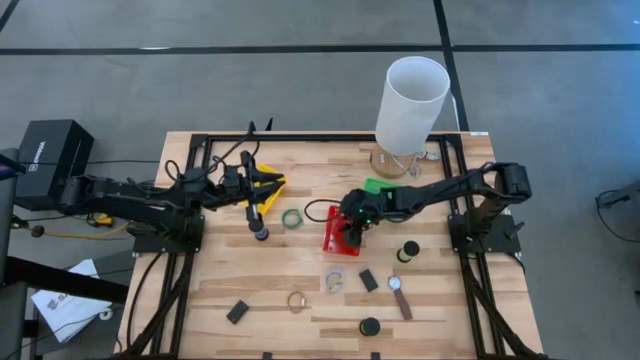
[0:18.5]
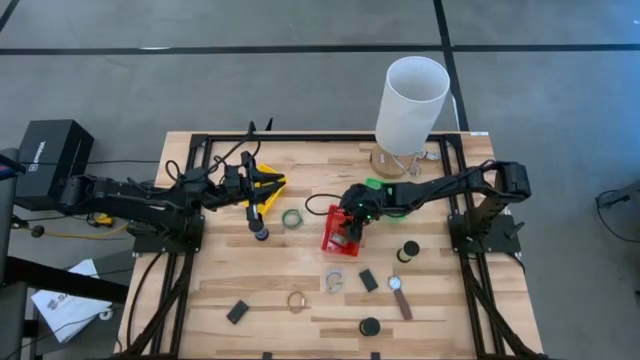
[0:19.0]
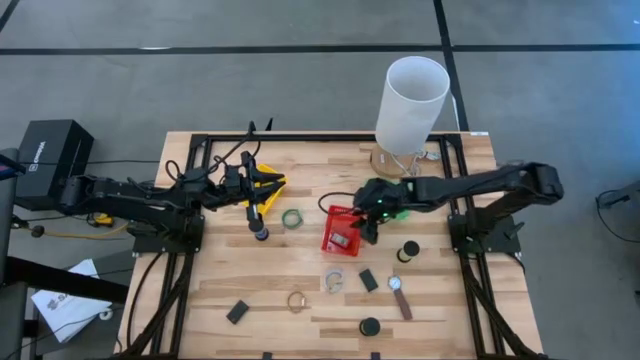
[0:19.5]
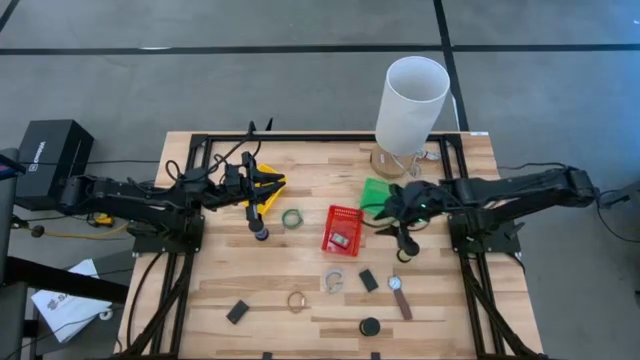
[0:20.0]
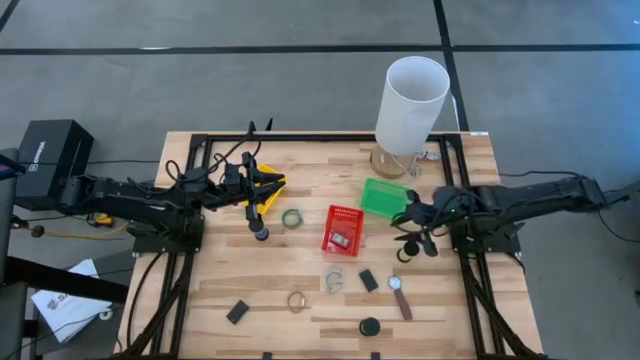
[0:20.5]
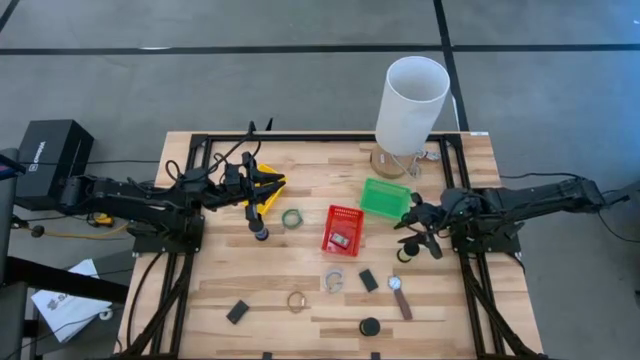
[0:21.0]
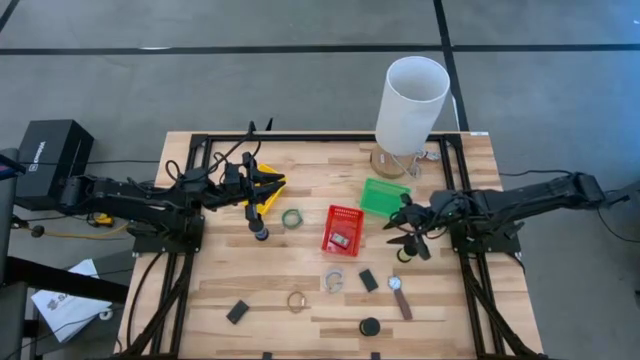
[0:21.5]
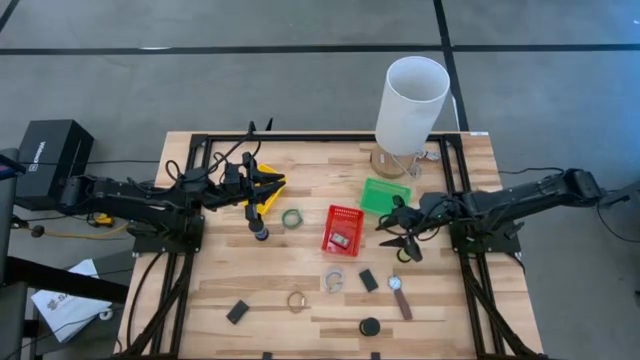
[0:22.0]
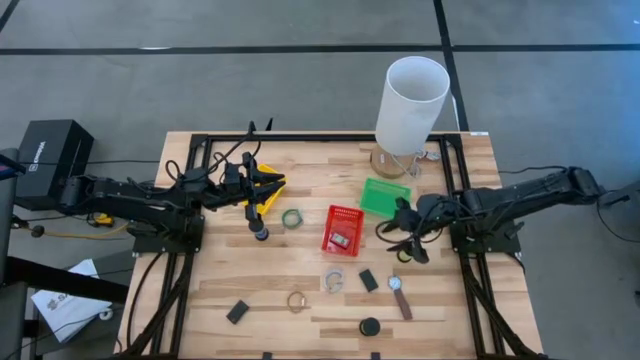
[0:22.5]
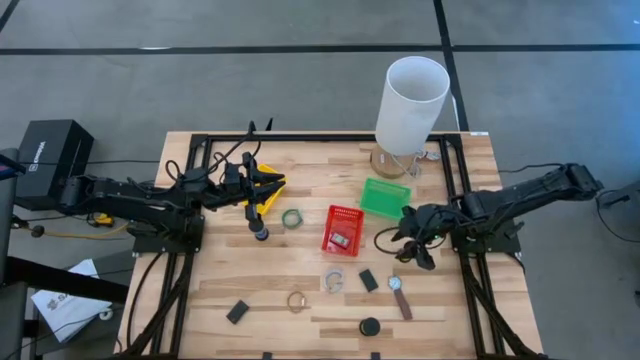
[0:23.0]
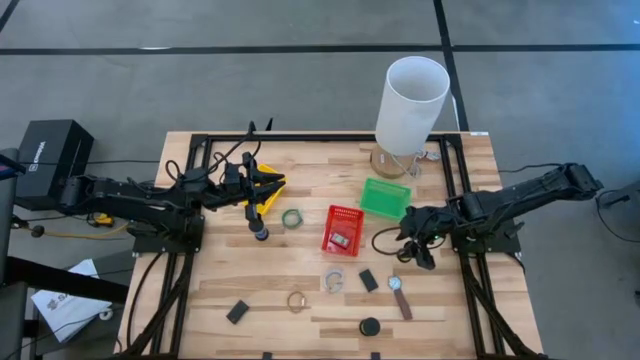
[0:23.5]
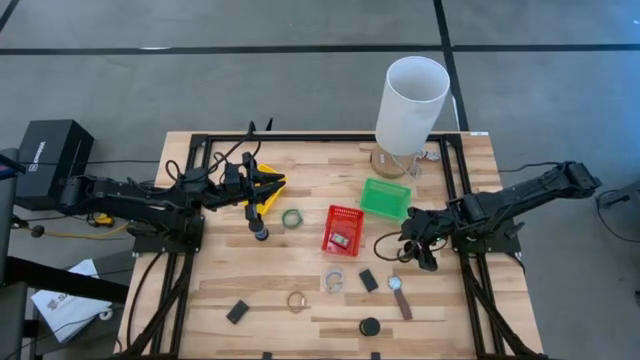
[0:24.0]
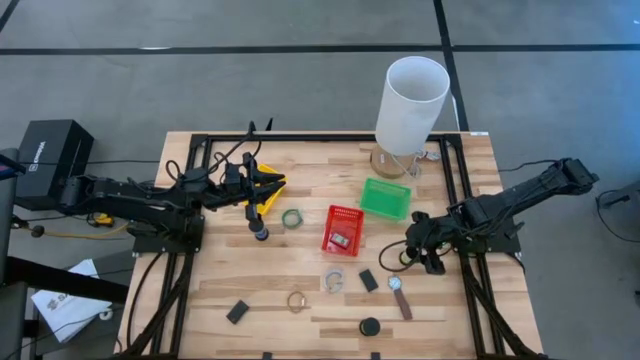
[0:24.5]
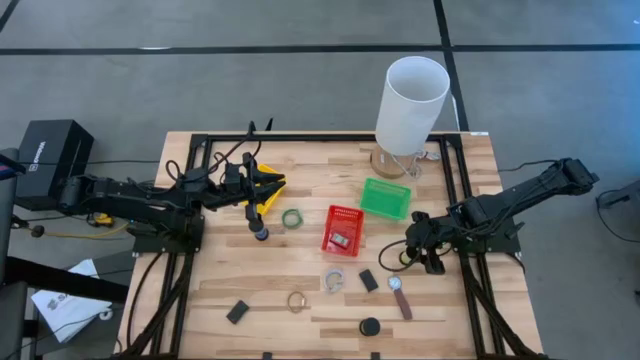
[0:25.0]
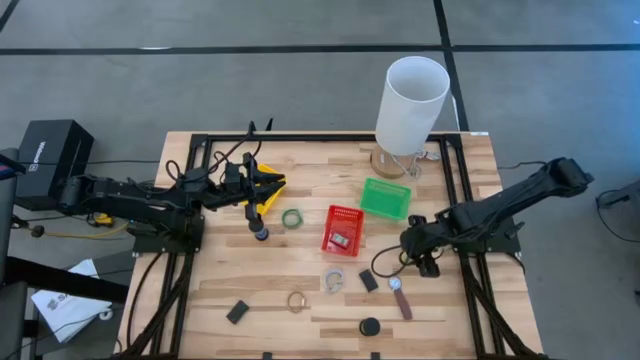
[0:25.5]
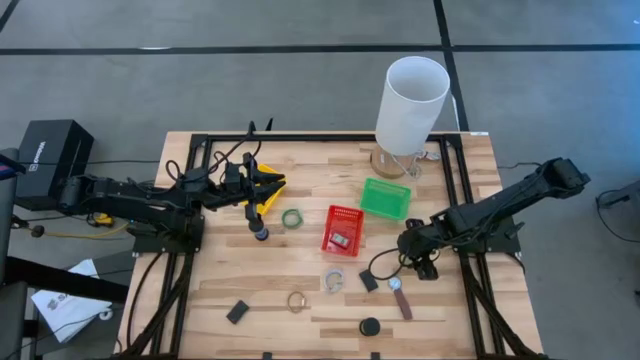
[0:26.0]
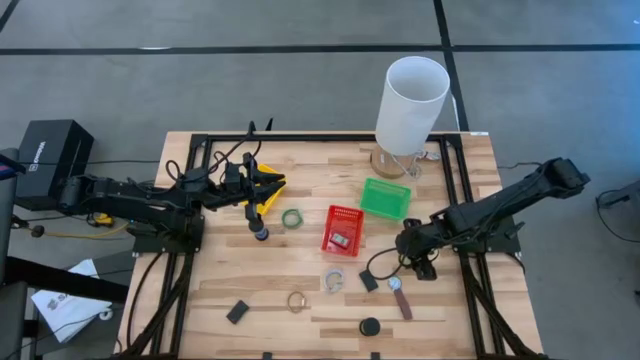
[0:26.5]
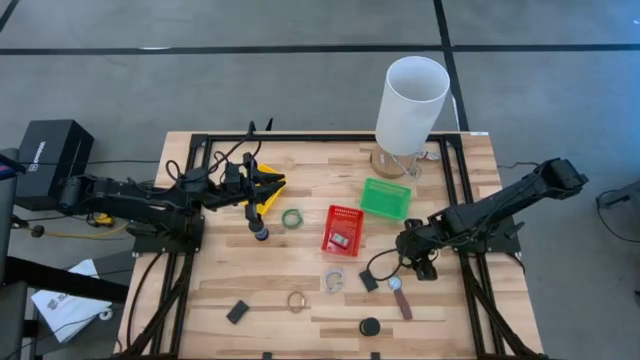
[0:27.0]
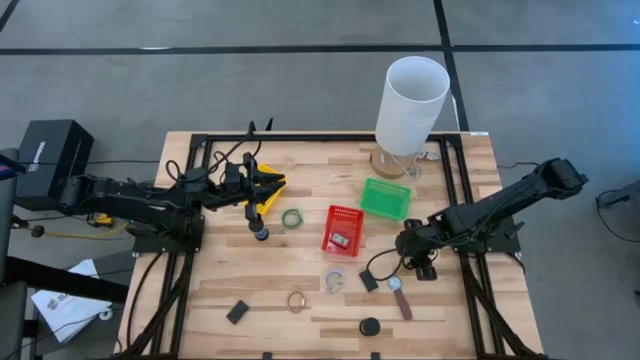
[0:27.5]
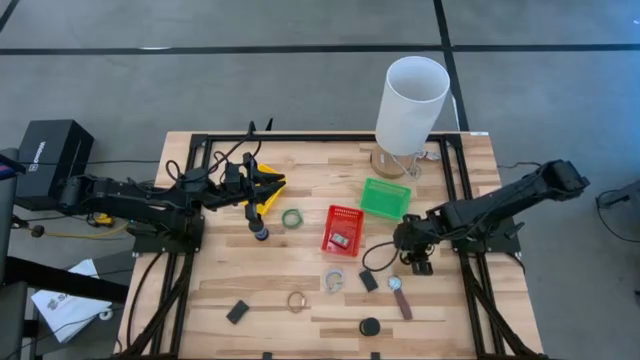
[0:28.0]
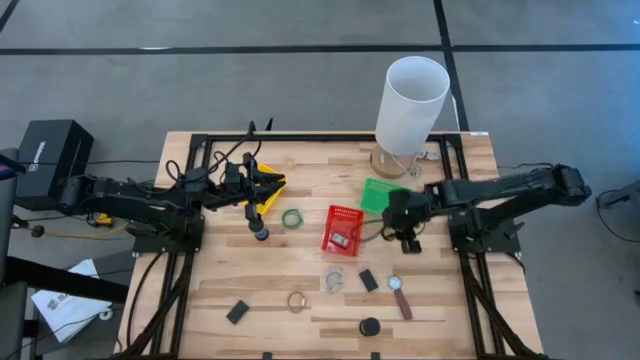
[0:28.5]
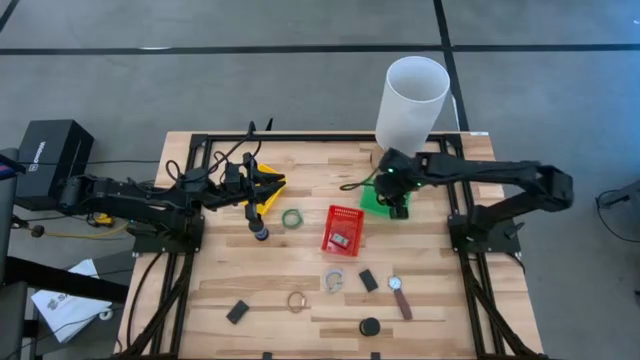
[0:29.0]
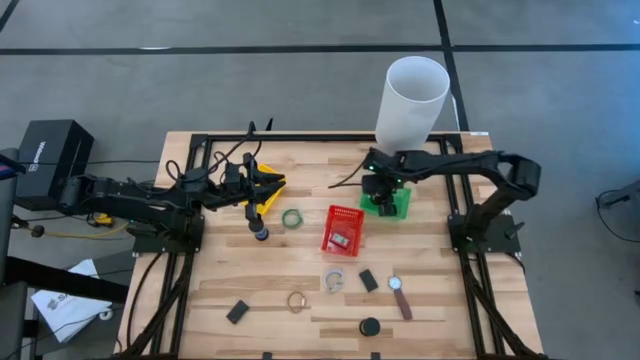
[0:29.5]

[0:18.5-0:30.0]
Task: Pick & Place Office items
Put the top right black hourglass into the green bin

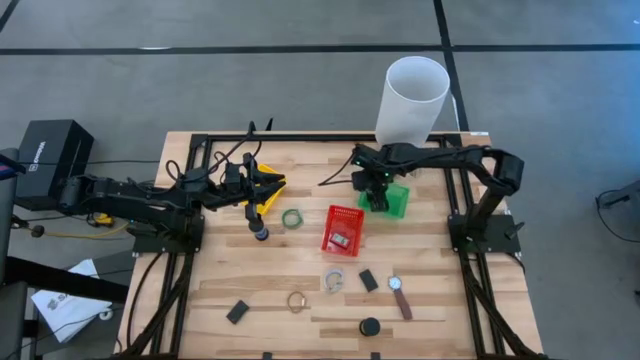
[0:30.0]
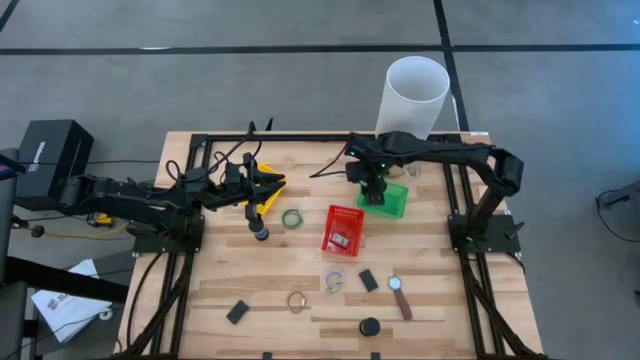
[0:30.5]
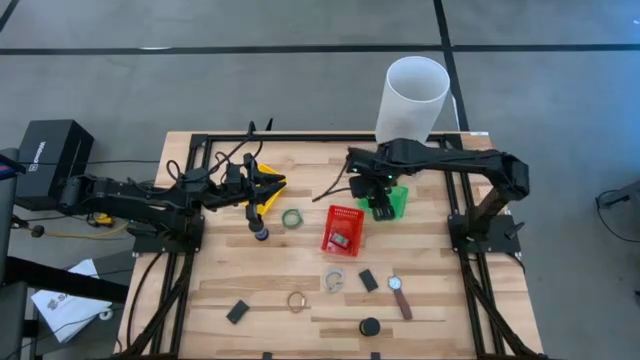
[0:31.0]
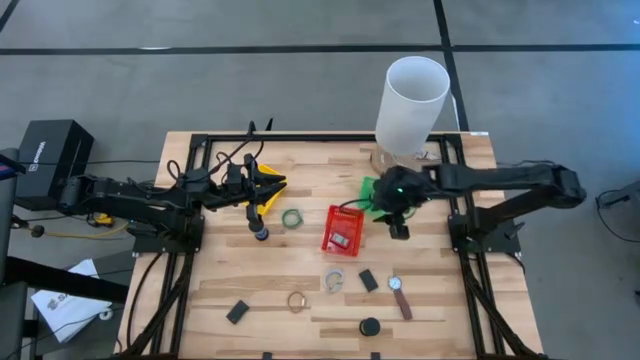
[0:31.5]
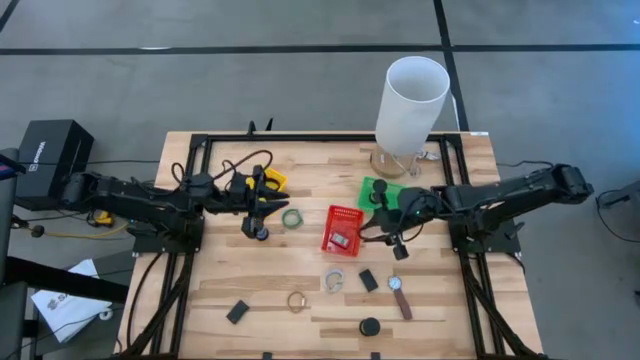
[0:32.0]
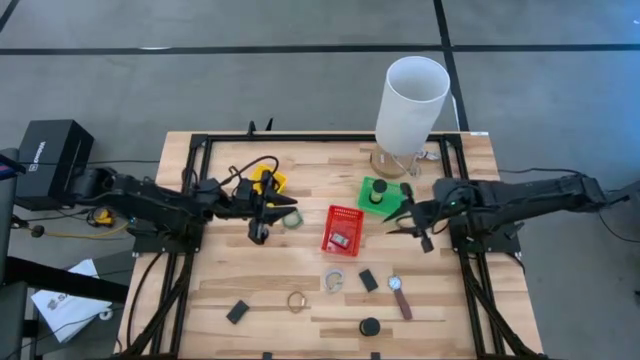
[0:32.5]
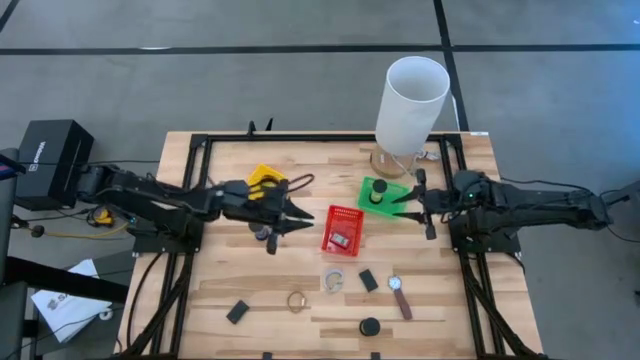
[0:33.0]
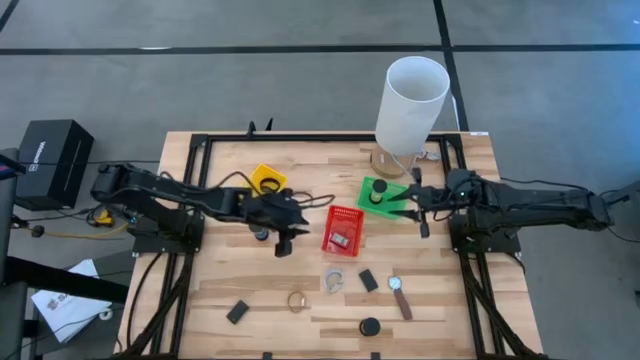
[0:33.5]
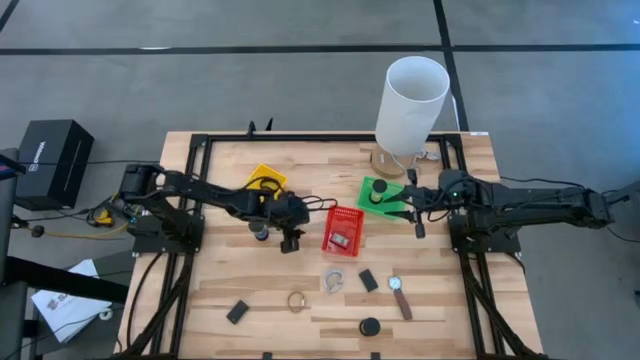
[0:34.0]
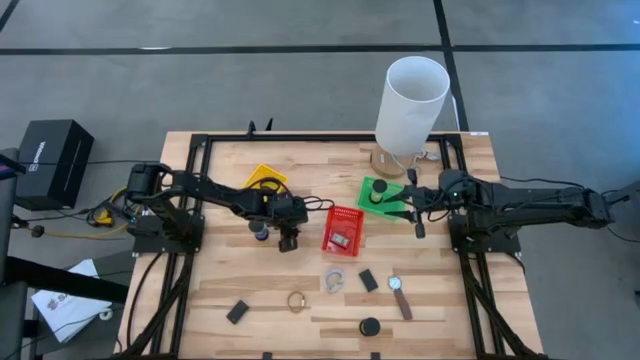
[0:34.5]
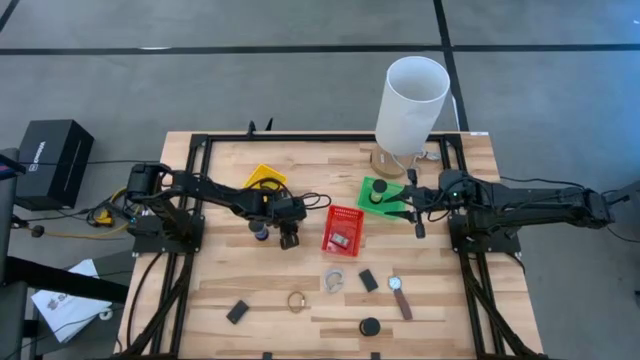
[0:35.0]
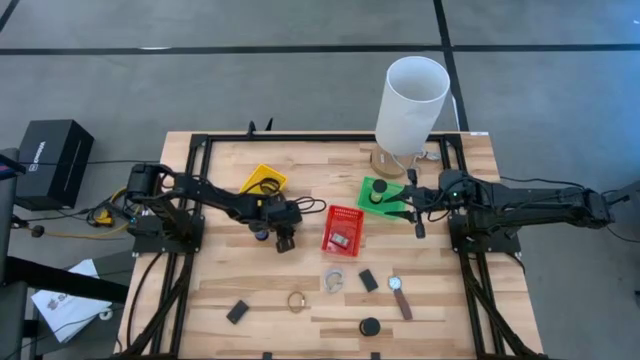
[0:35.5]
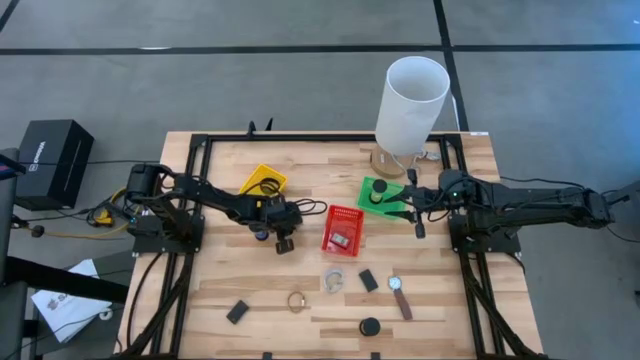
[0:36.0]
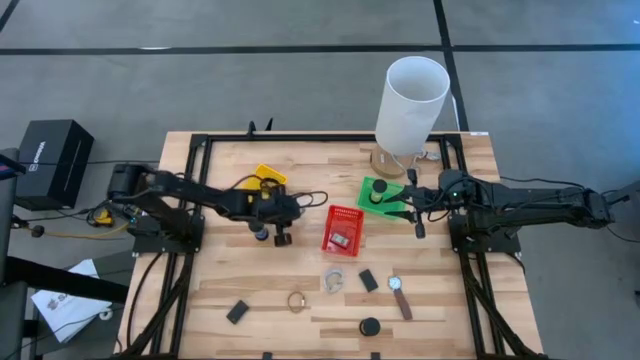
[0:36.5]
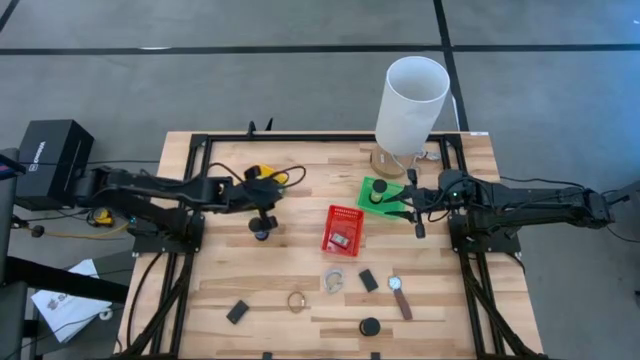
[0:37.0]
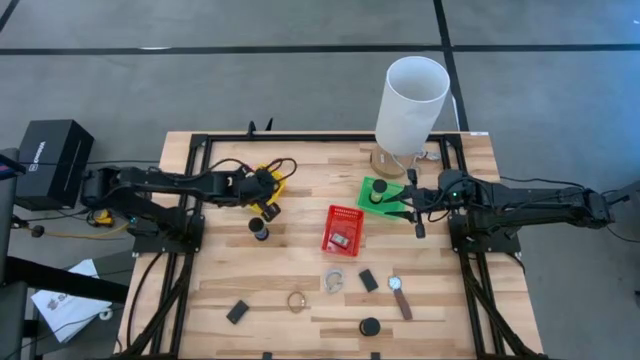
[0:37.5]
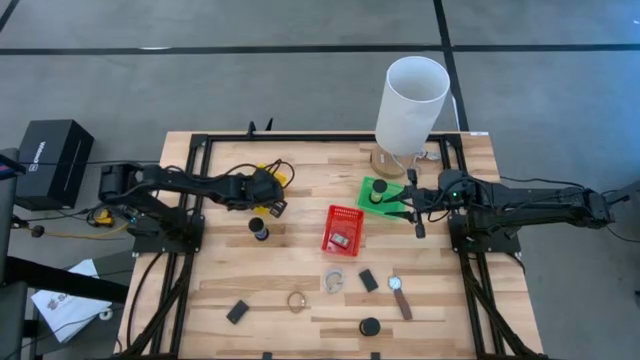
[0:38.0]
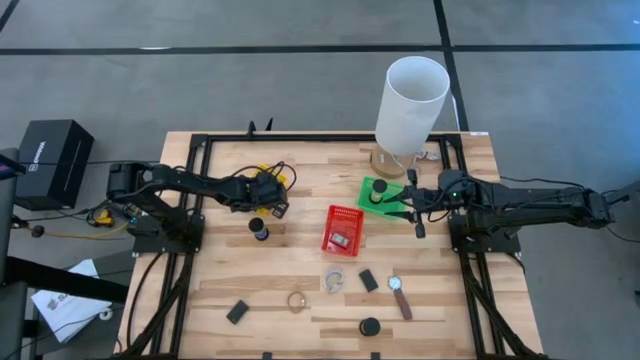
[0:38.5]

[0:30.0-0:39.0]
Put the green wristwatch into the yellow bin

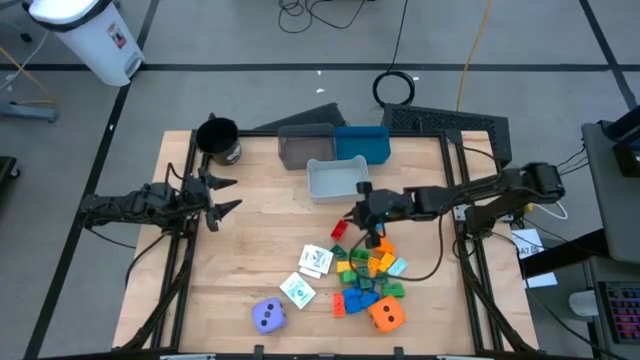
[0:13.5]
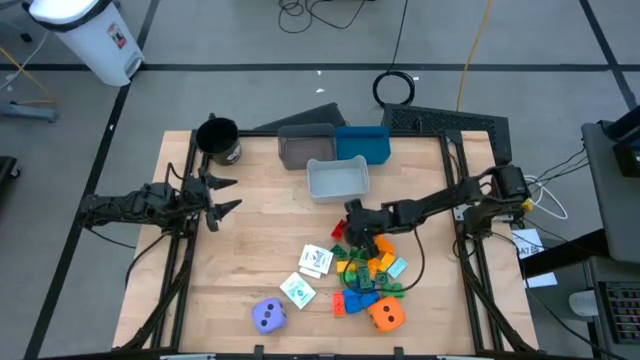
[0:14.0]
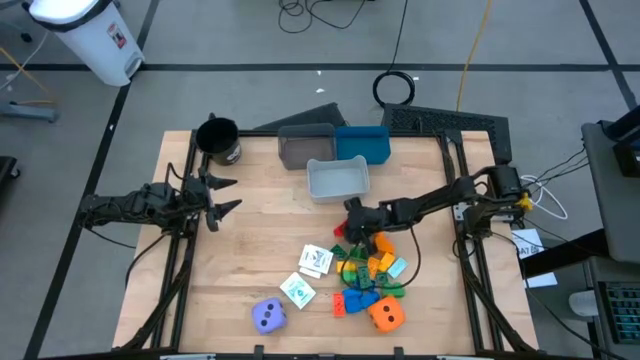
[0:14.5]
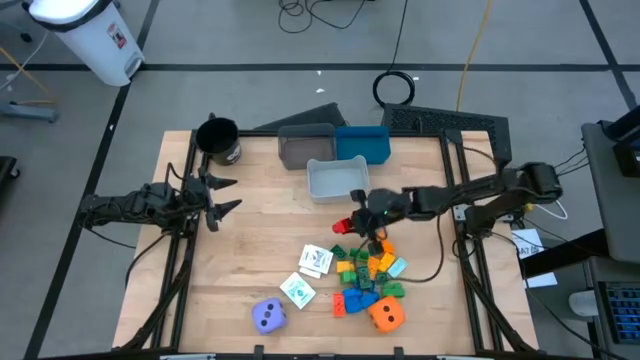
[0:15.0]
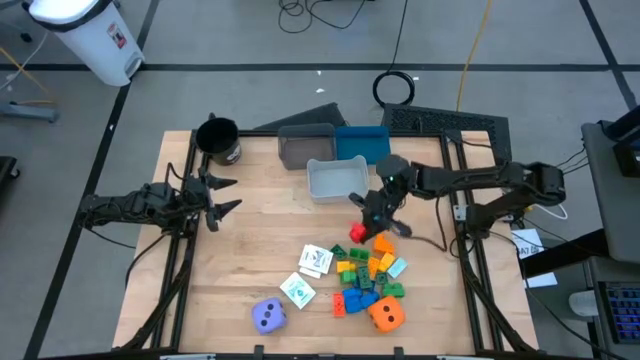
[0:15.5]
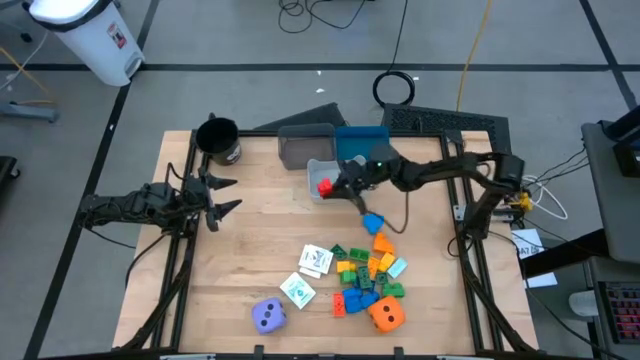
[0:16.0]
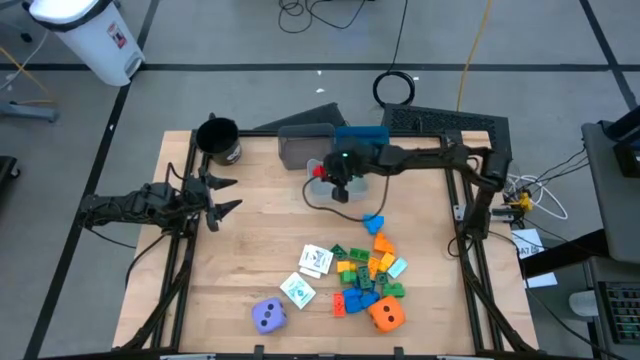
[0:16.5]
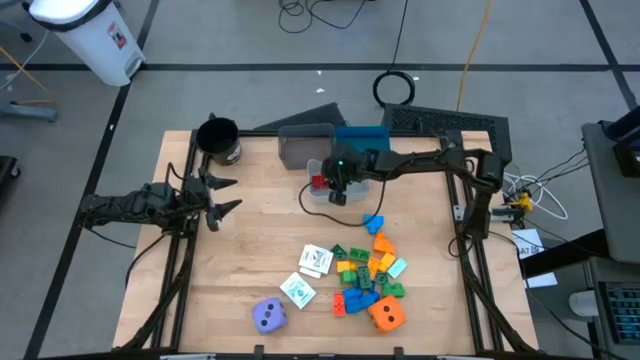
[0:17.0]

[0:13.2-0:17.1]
Task: Pick & Place Toys
Put the red game piece into the gray bin
